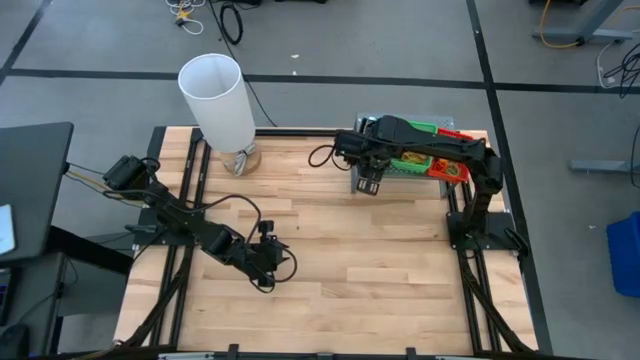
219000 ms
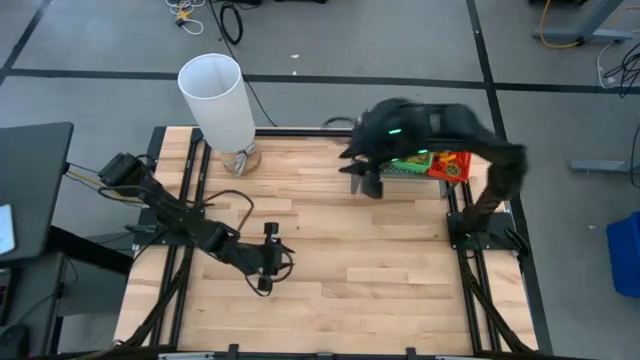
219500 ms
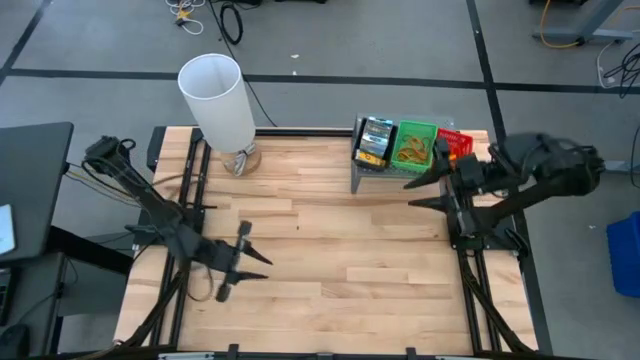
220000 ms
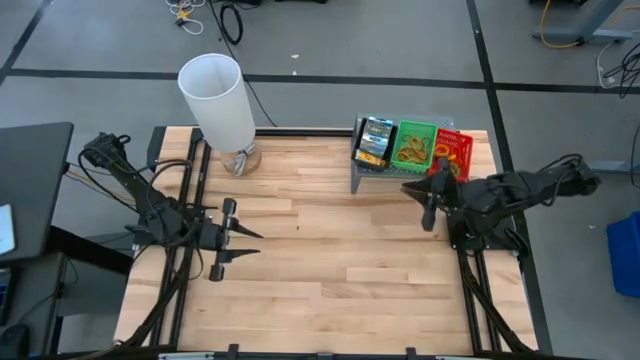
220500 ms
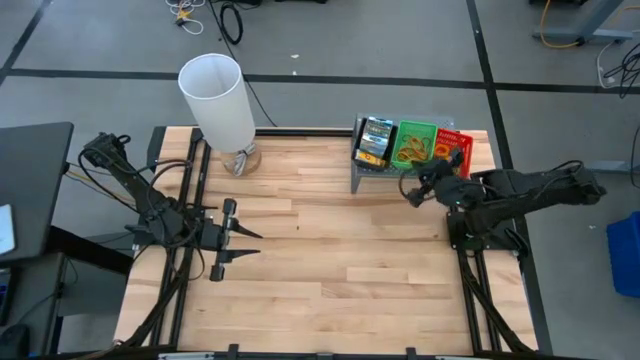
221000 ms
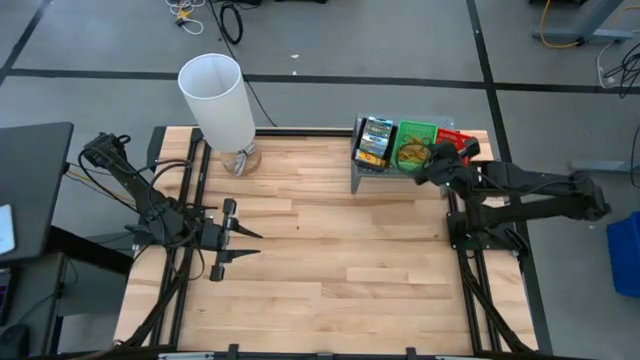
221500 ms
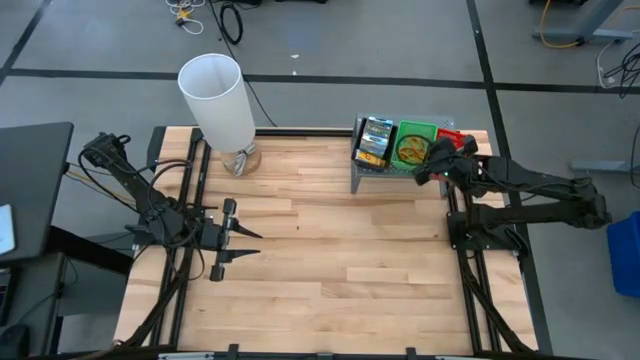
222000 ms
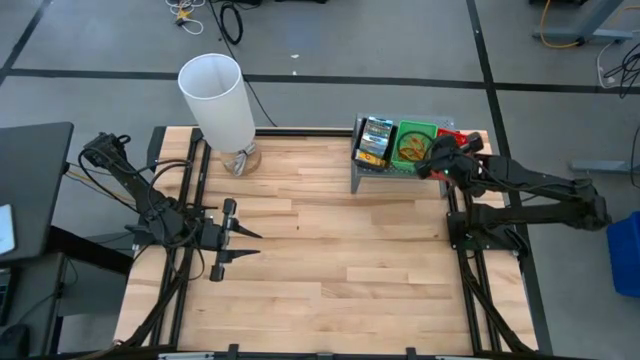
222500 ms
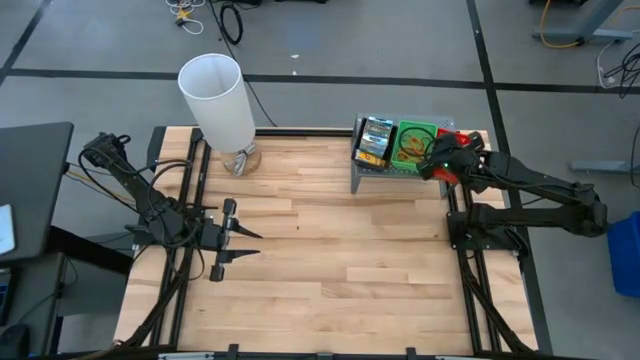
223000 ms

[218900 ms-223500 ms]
Task: Pick & Place Office Desk Supplies
Adjust the green bin on the shelf

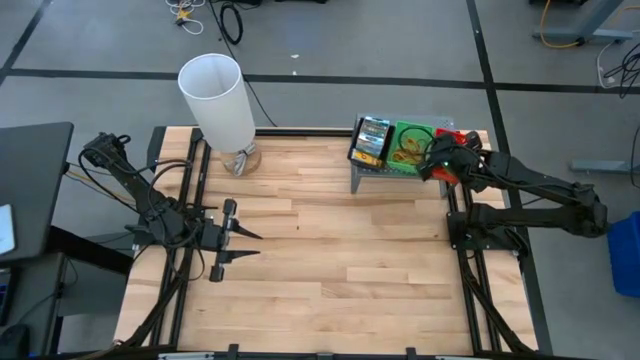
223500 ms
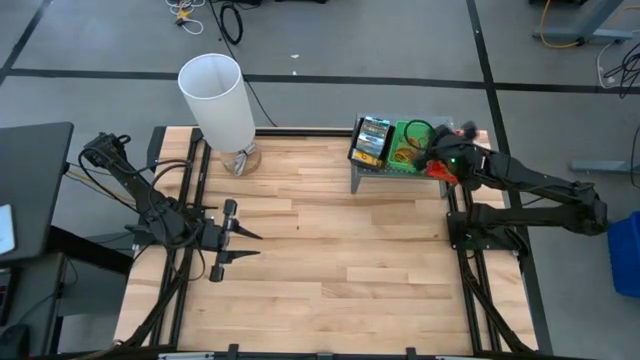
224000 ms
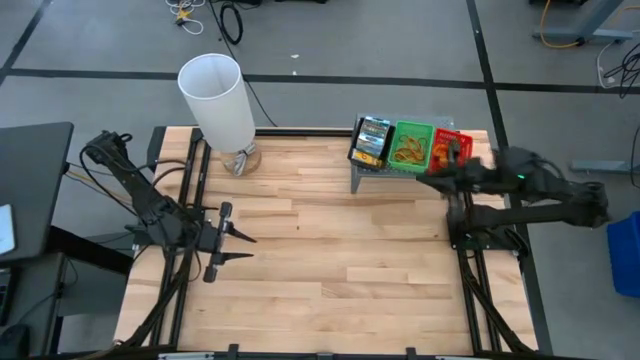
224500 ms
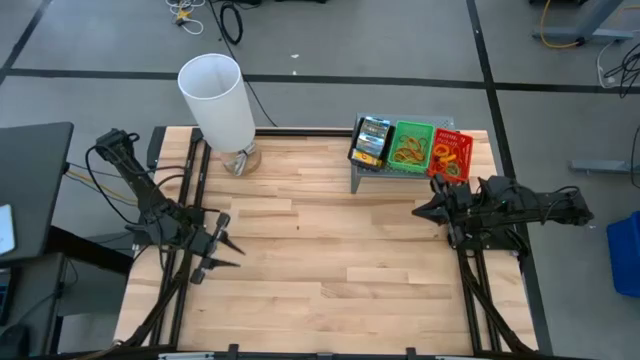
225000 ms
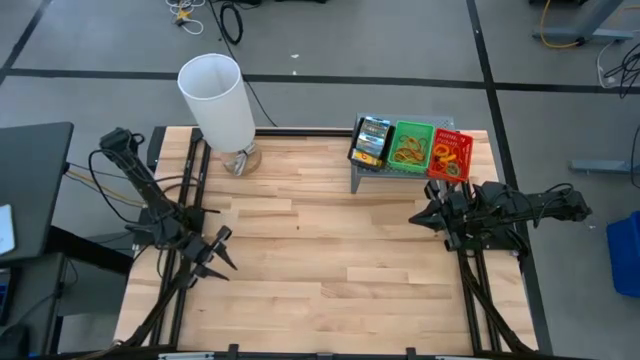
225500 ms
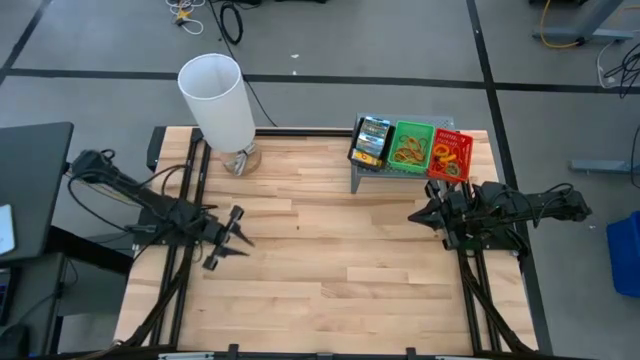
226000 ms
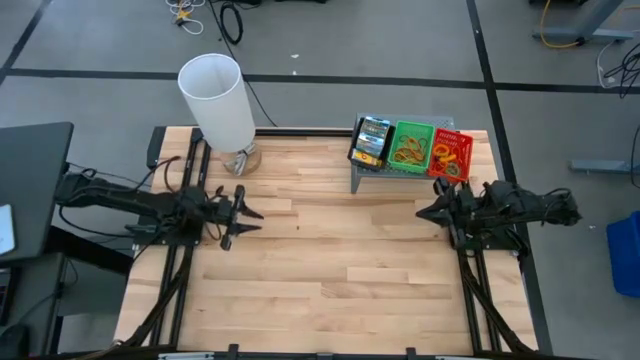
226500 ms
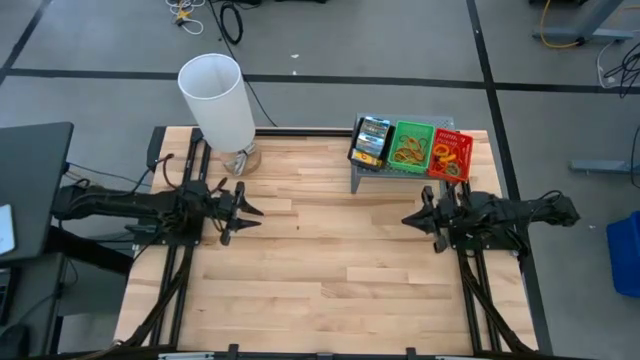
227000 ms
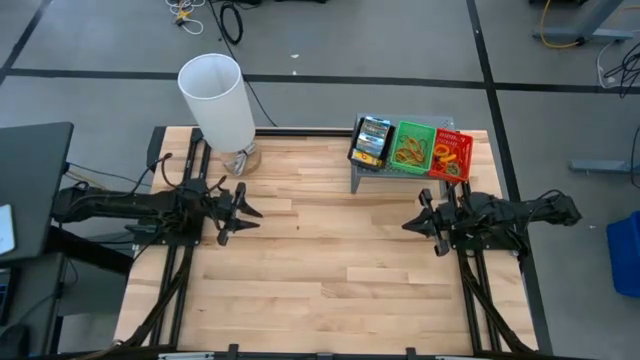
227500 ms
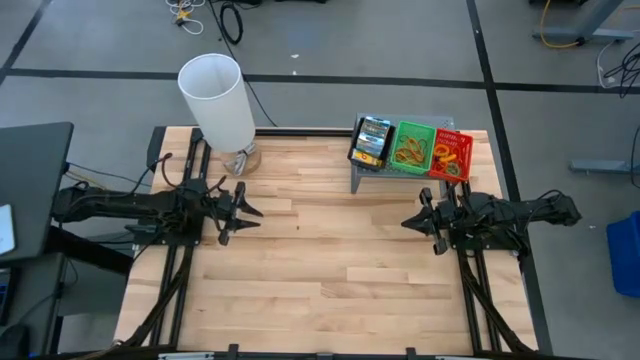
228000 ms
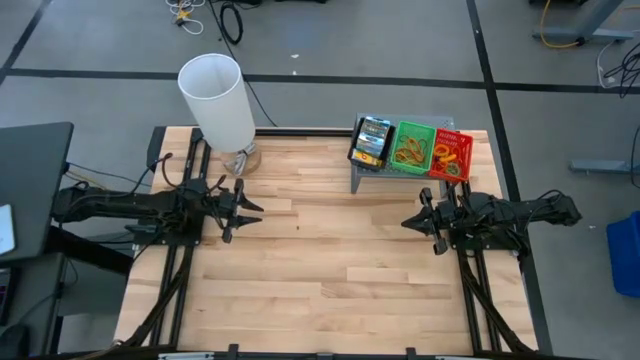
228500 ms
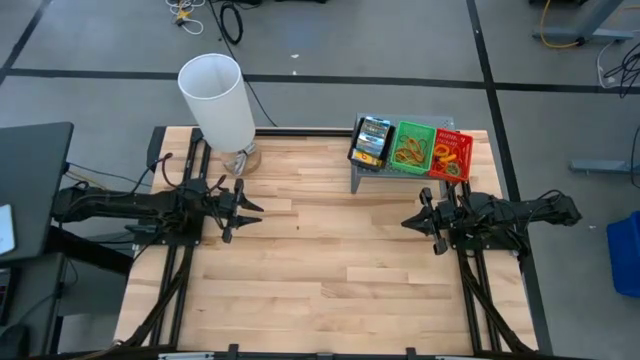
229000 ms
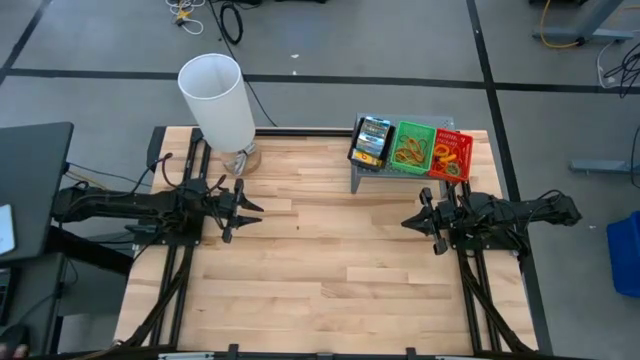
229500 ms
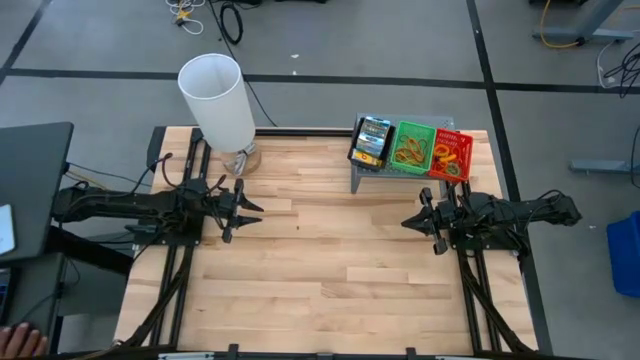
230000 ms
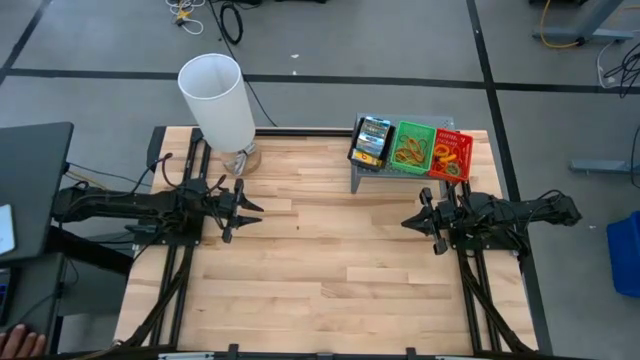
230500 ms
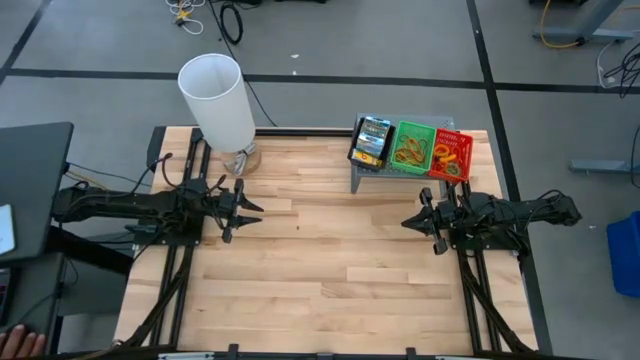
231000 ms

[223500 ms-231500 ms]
Return to Home Position

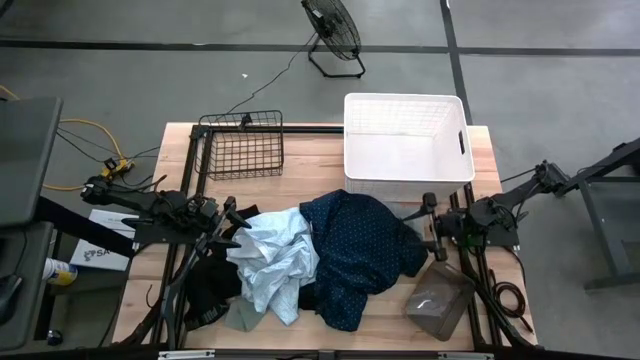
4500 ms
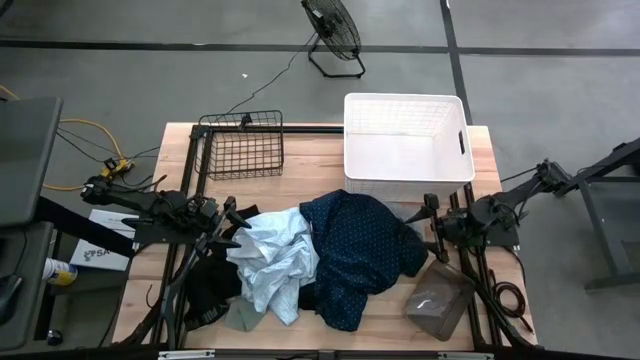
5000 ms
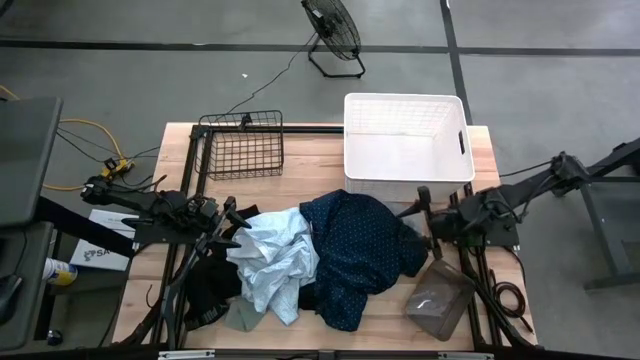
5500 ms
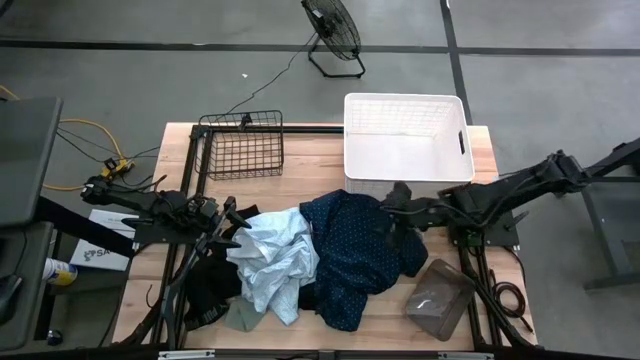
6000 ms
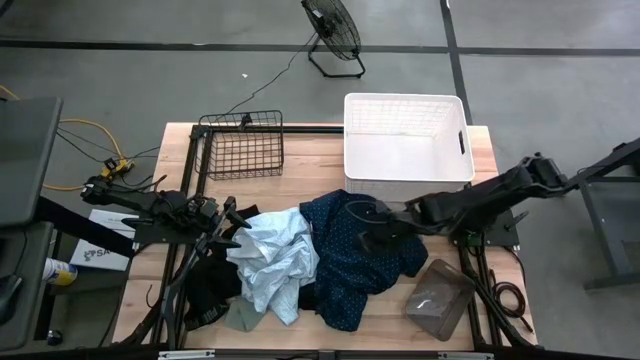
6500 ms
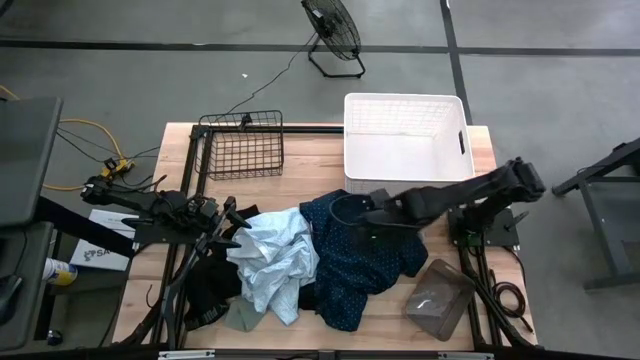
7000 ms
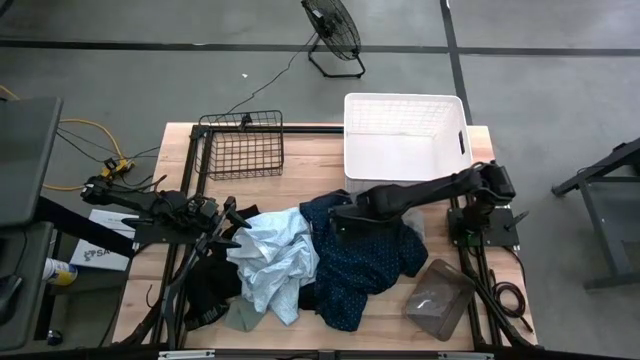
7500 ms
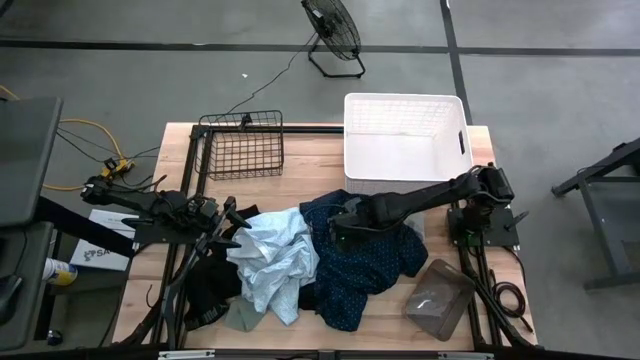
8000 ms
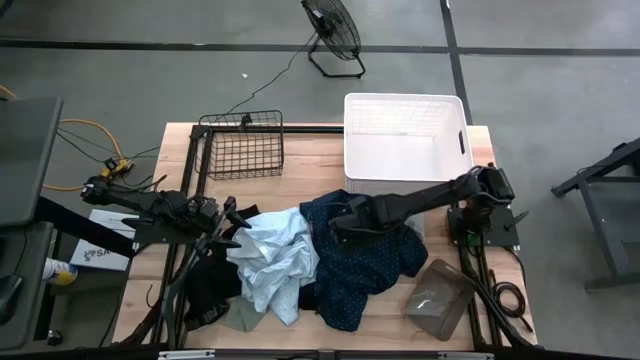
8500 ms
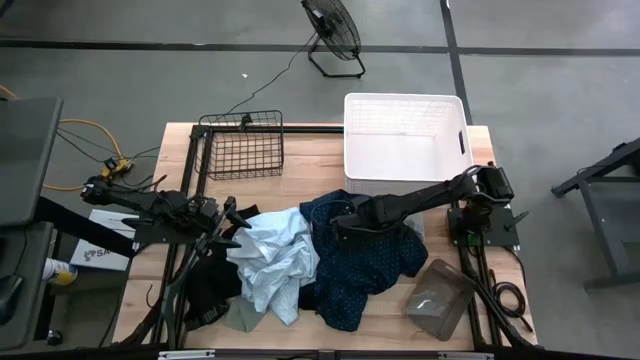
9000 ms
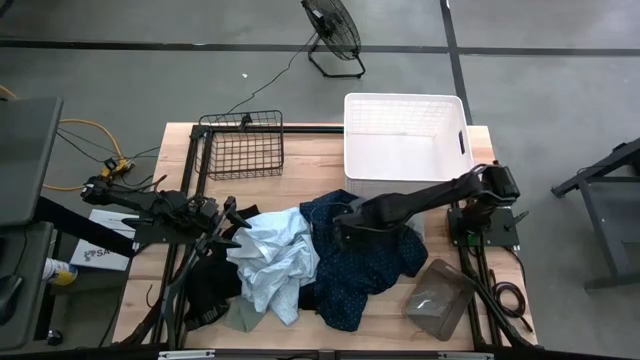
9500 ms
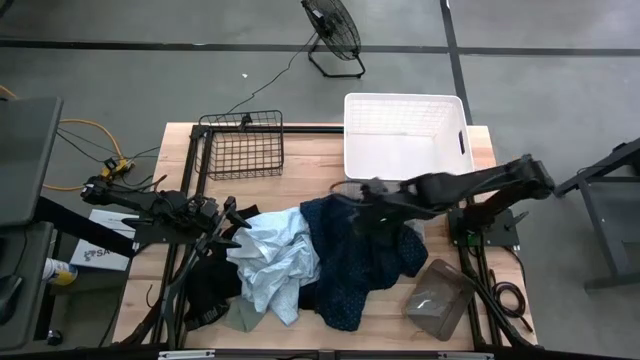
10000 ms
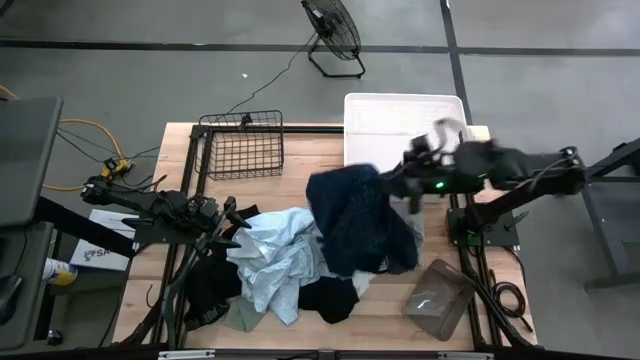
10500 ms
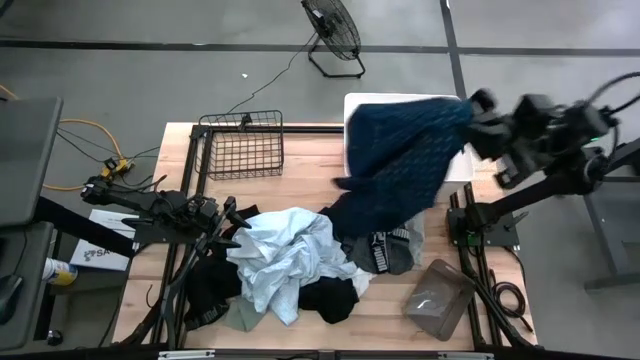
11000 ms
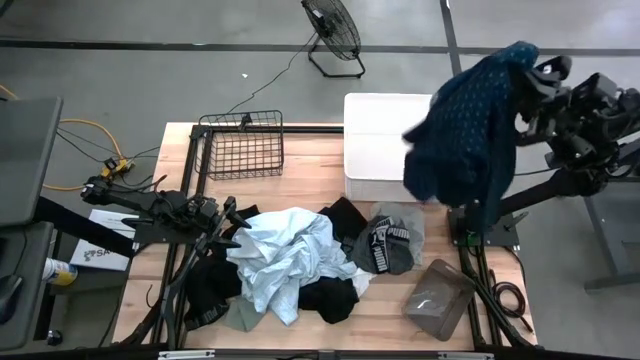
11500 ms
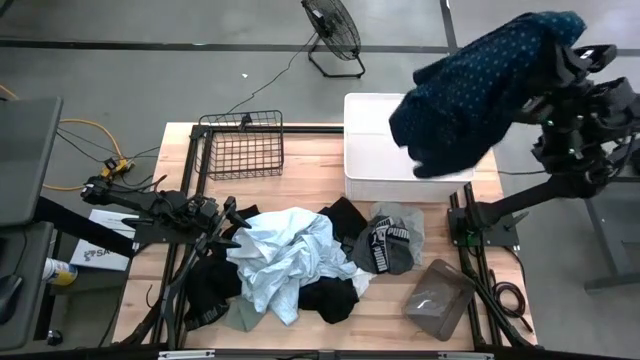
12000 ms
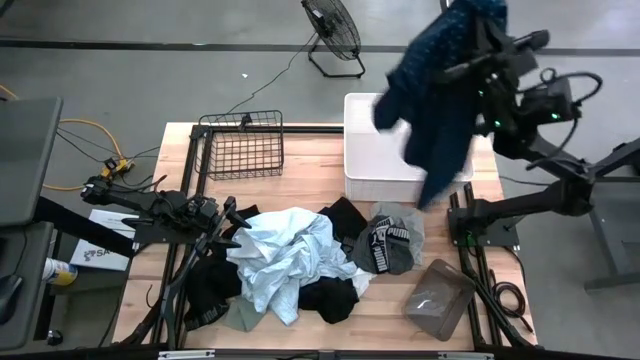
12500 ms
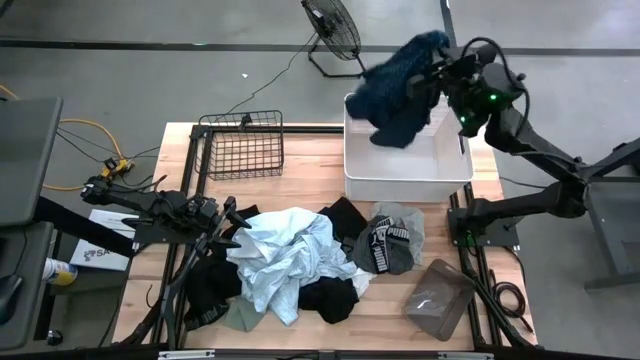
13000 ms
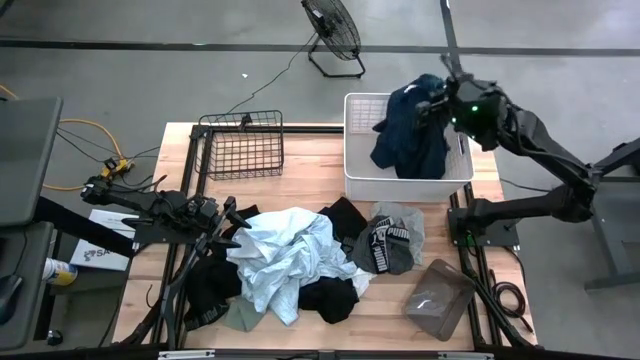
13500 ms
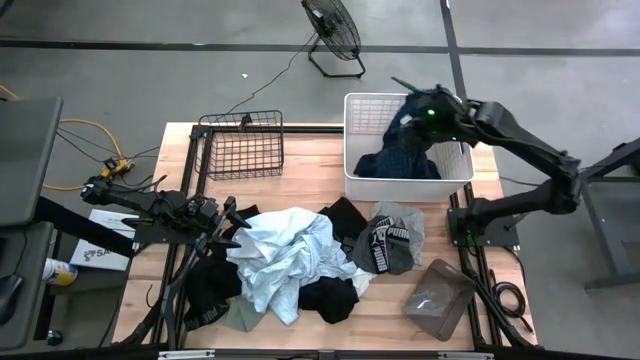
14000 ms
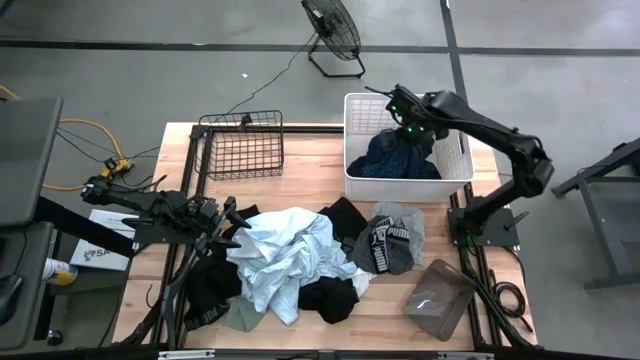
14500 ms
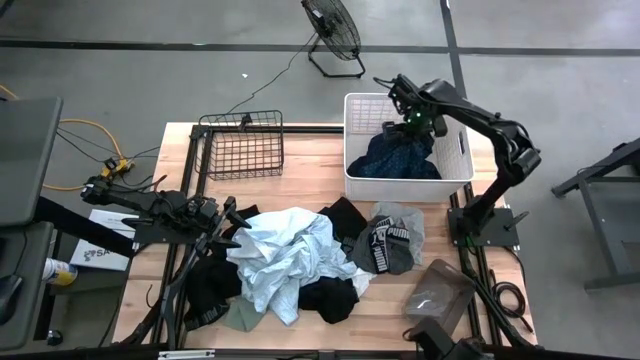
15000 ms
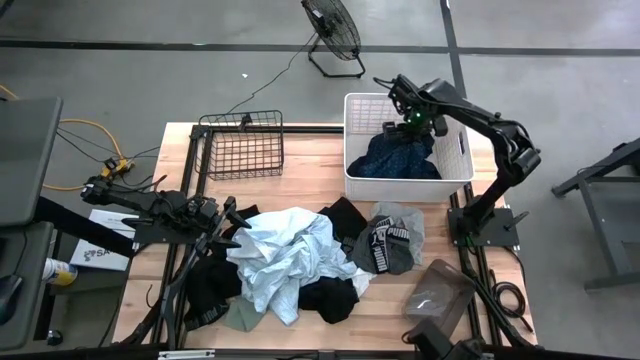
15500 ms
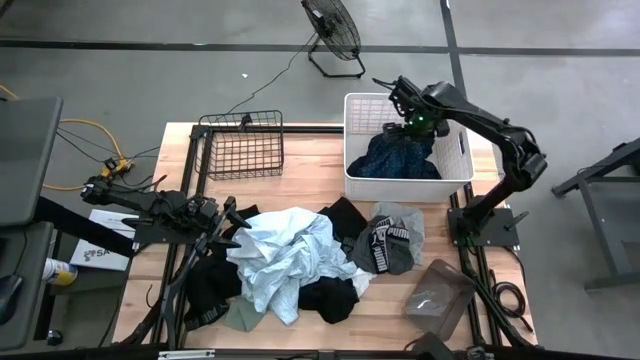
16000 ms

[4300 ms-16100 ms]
Task: Pick & Place Cloths
Put the dark blue patterned shirt into the white bin
